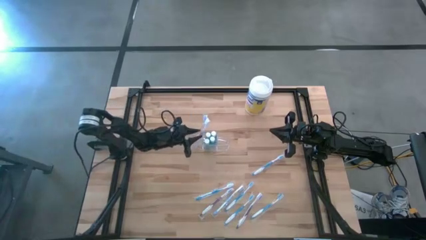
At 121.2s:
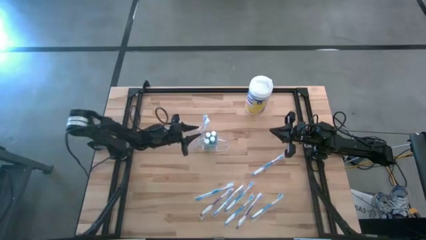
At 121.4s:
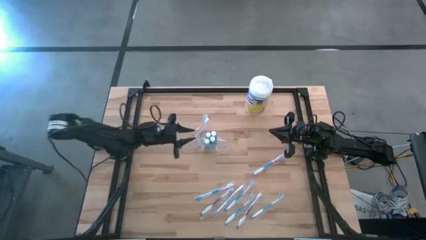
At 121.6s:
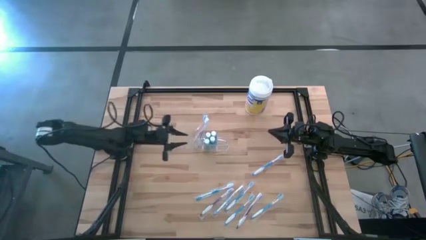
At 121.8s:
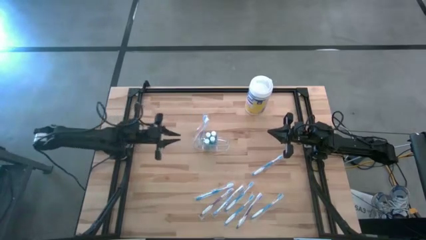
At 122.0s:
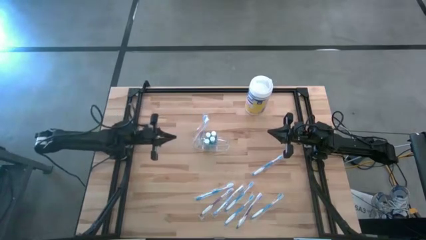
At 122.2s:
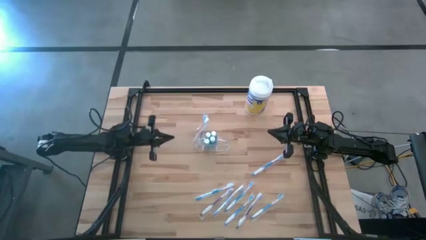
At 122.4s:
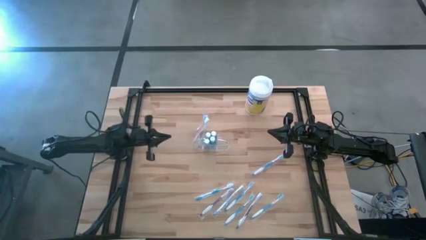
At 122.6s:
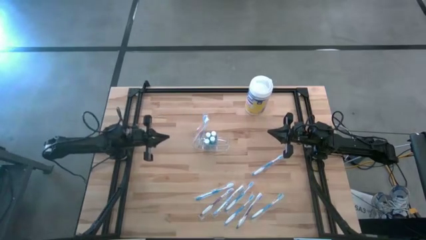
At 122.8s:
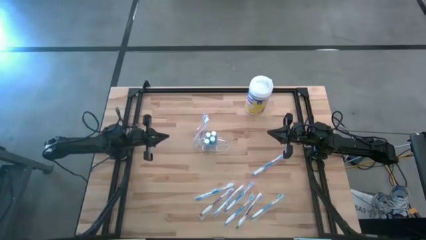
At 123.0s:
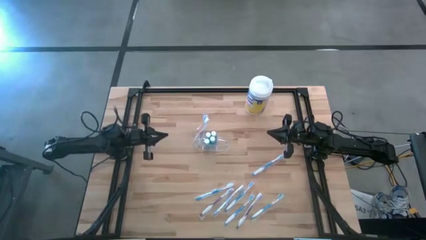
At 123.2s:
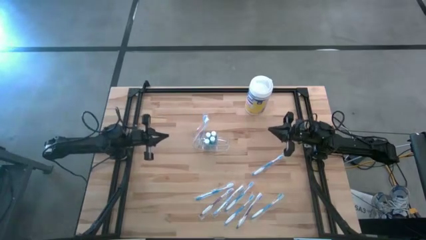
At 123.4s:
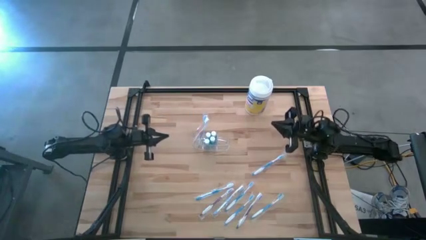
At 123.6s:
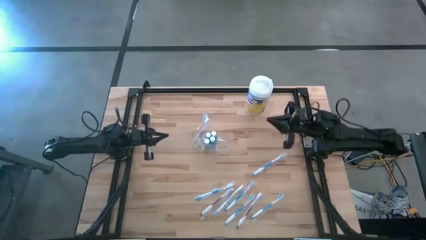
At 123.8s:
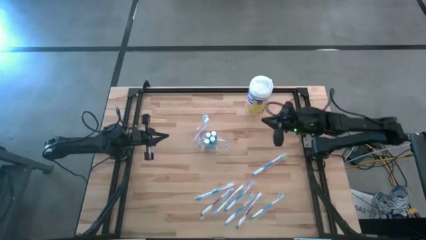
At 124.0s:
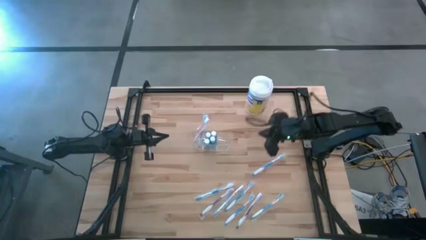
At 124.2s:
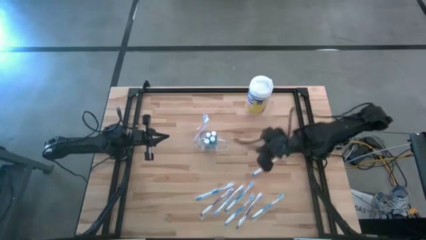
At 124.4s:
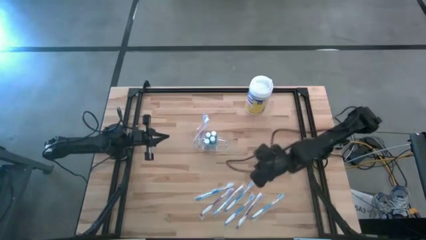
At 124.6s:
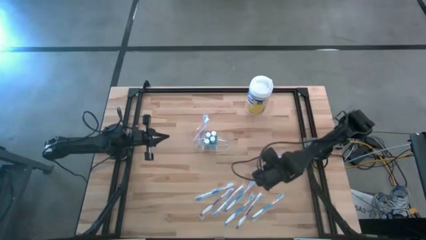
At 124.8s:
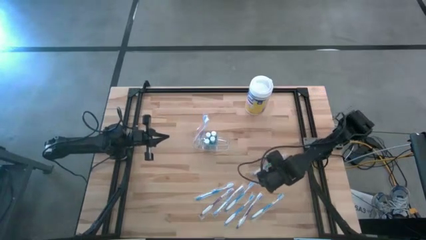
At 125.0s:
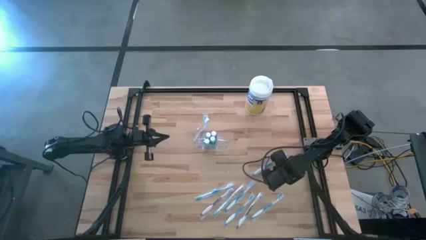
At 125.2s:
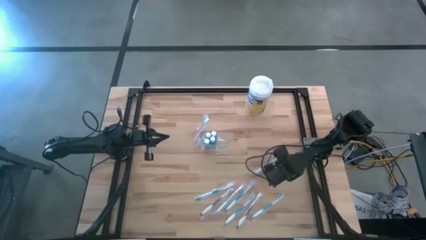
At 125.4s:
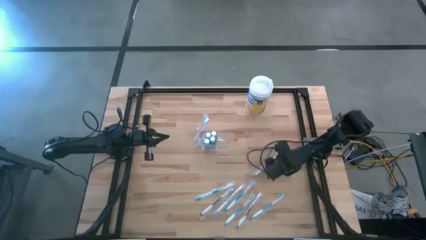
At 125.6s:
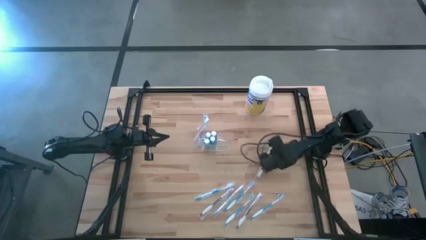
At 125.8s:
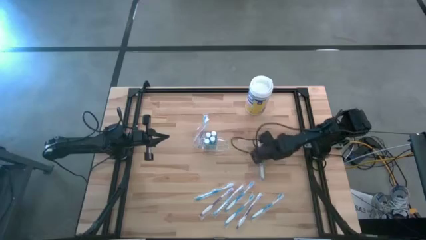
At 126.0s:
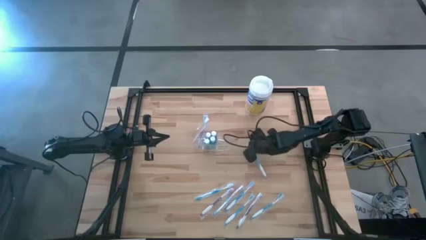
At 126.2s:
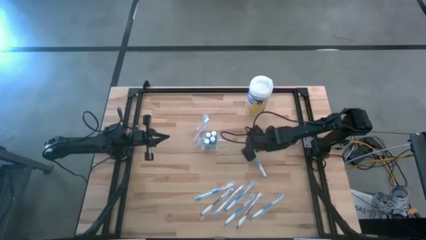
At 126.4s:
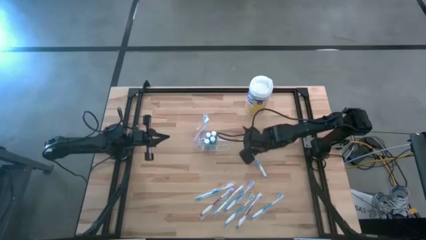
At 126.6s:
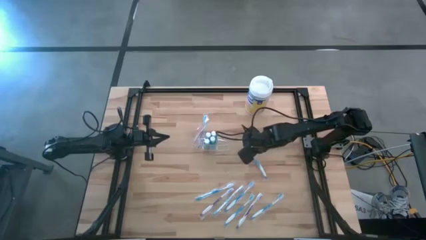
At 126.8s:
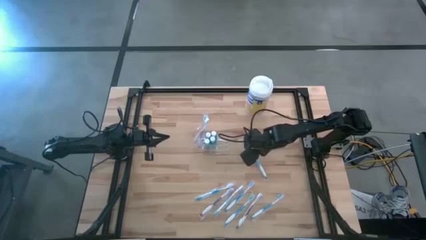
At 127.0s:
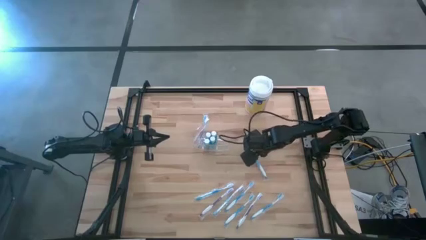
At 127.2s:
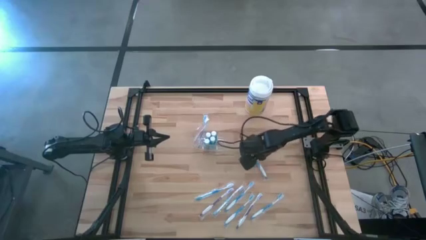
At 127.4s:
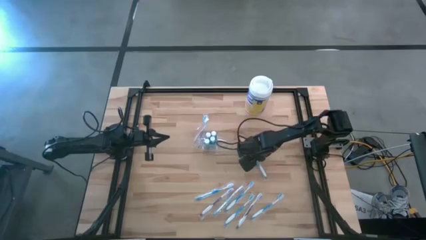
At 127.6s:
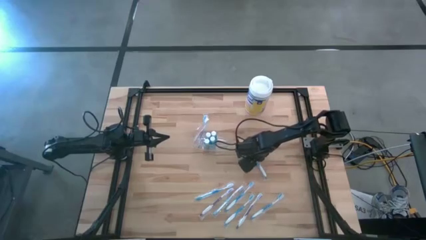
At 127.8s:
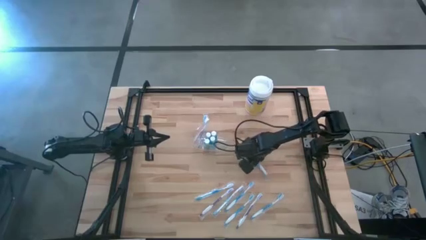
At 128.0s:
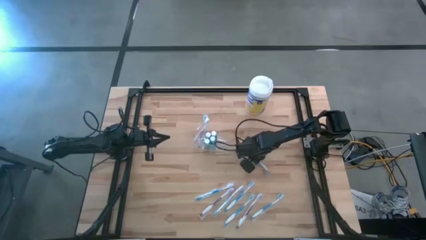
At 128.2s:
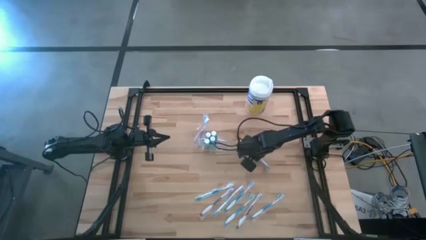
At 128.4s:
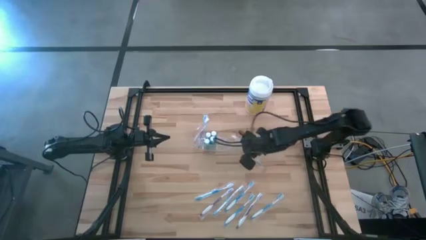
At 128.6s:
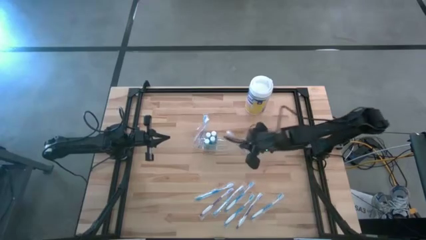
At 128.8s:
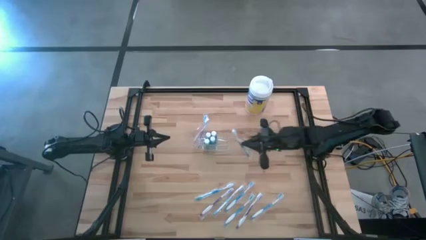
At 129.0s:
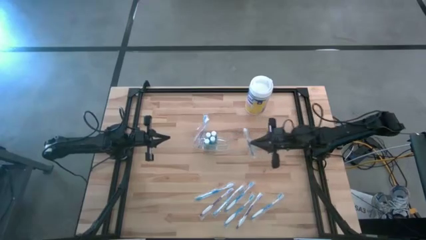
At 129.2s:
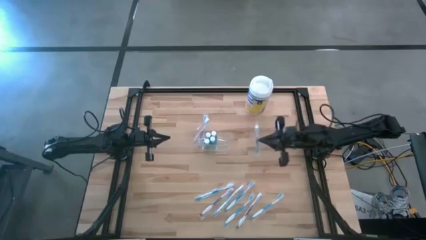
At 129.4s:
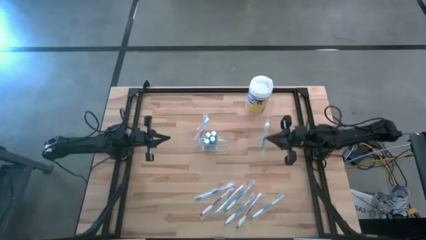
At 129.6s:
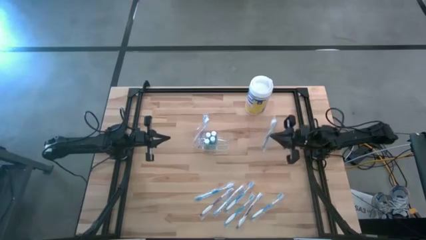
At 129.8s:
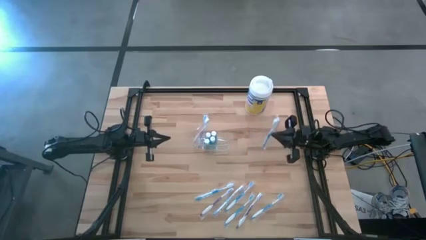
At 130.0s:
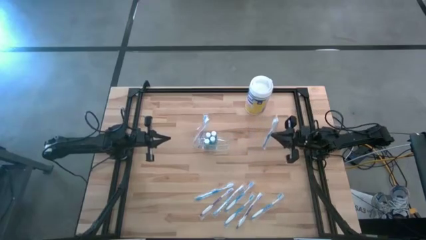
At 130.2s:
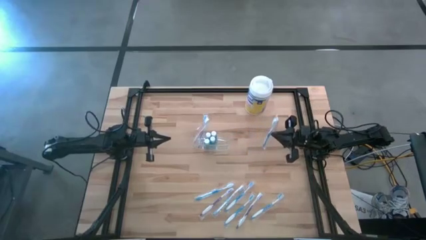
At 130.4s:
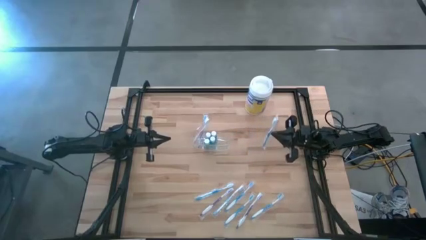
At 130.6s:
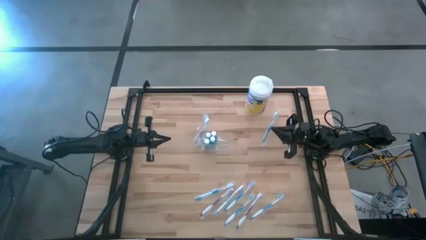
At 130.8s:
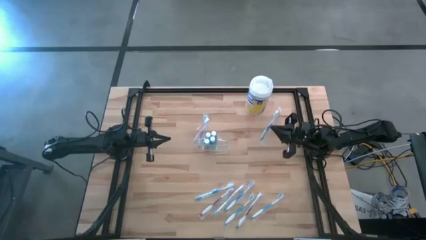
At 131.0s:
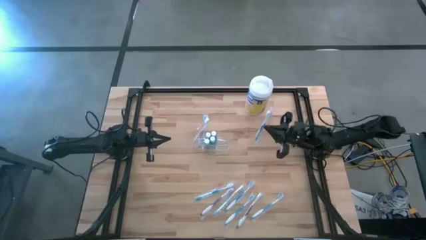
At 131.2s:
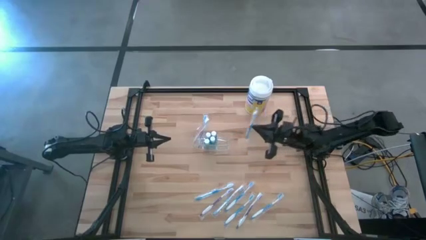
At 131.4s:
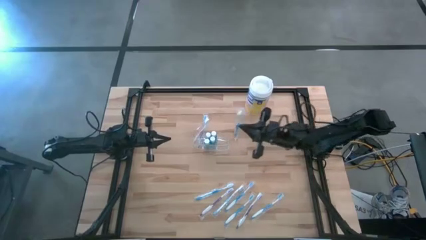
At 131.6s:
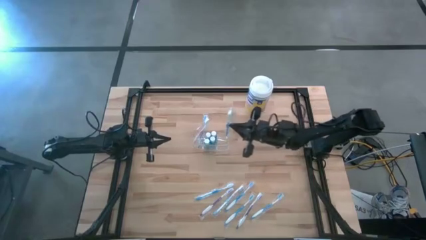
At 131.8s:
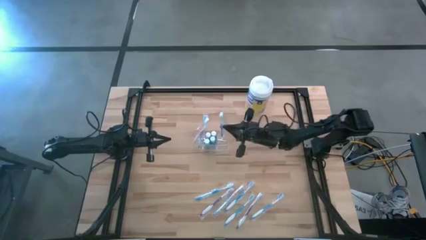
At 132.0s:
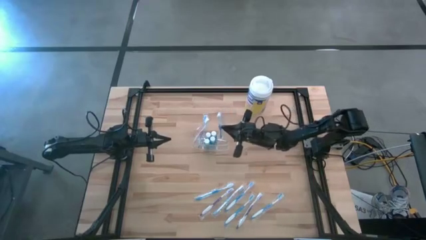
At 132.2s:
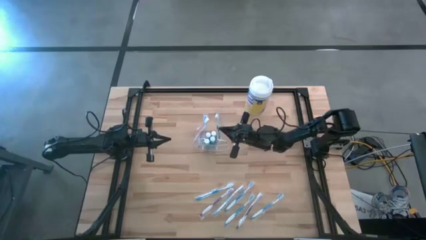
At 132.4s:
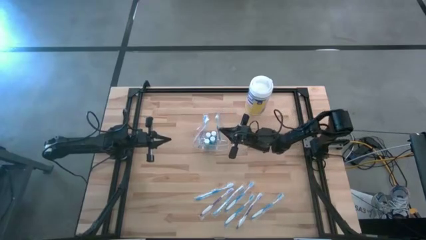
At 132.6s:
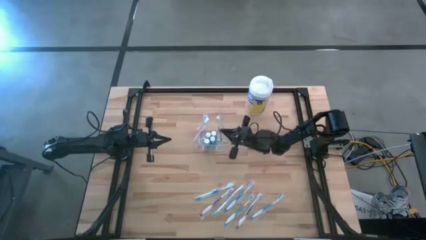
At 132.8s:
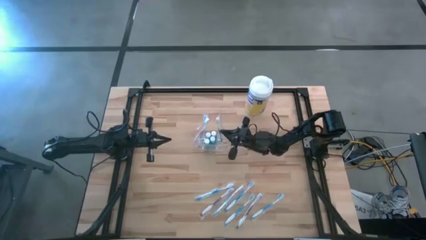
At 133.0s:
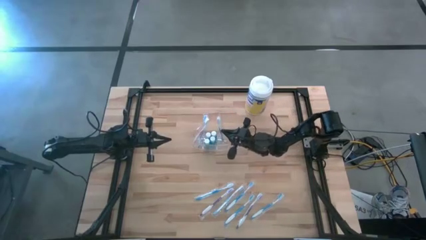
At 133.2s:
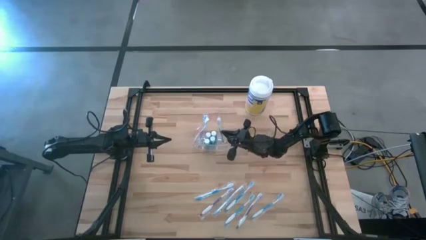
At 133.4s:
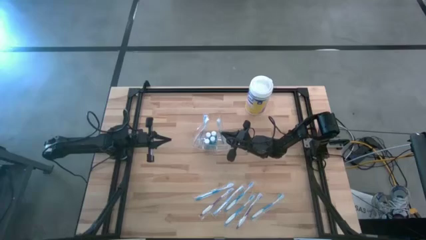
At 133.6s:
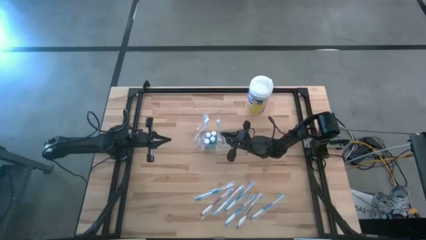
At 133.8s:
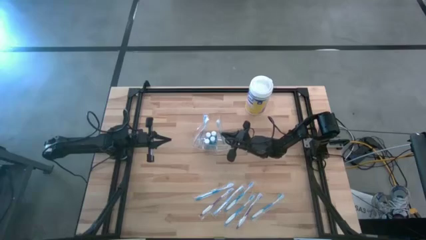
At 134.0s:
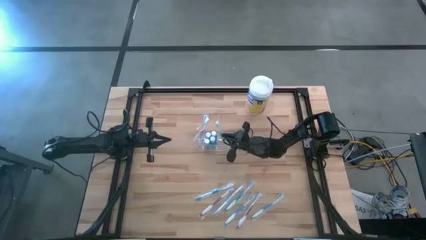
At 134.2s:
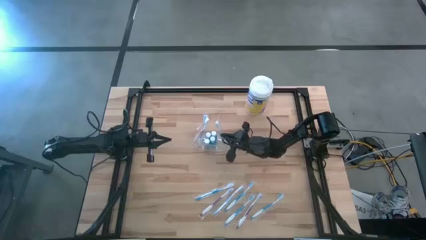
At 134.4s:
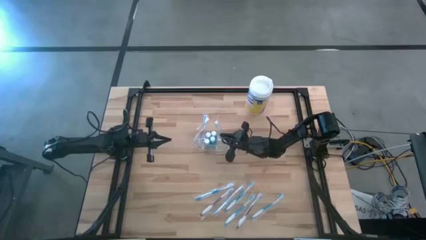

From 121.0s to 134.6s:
Task: Pick & Place toothbrushing station
Put the blue toothbrush into the transparent organizer
